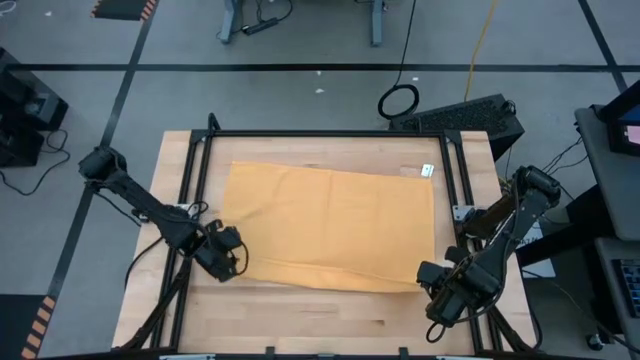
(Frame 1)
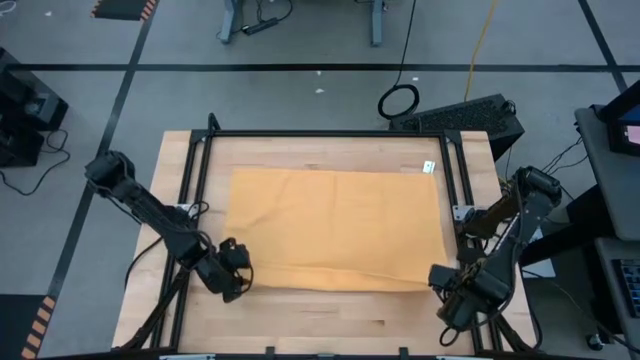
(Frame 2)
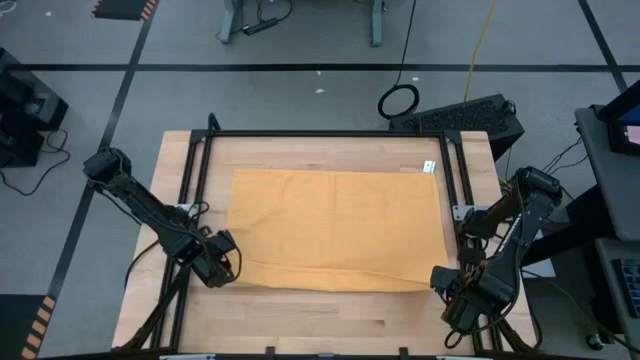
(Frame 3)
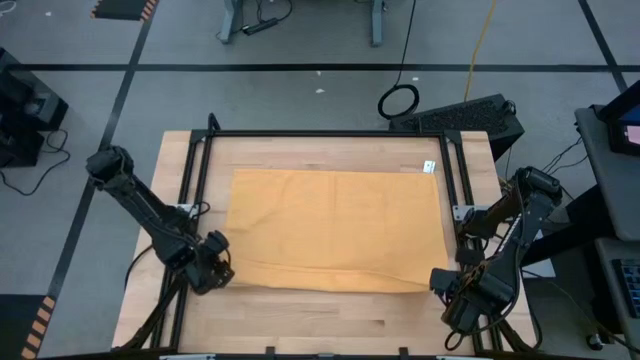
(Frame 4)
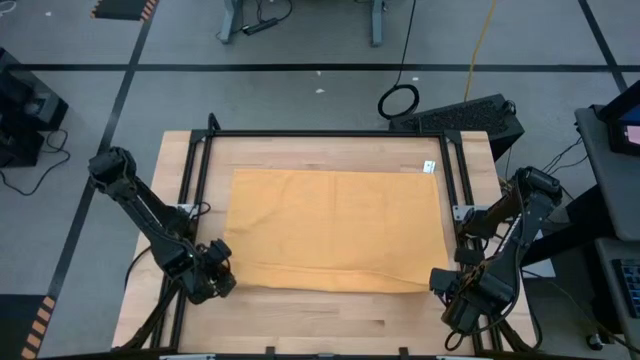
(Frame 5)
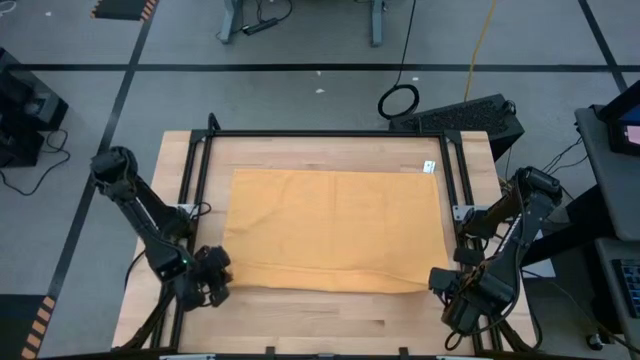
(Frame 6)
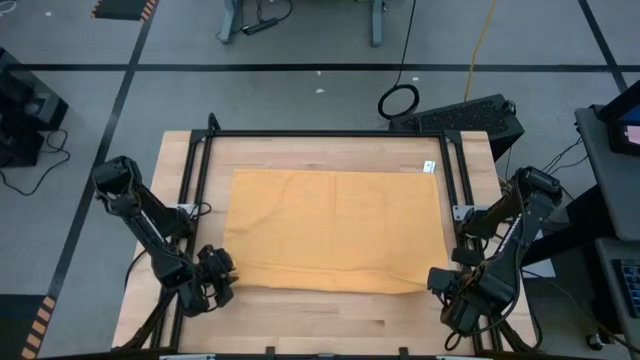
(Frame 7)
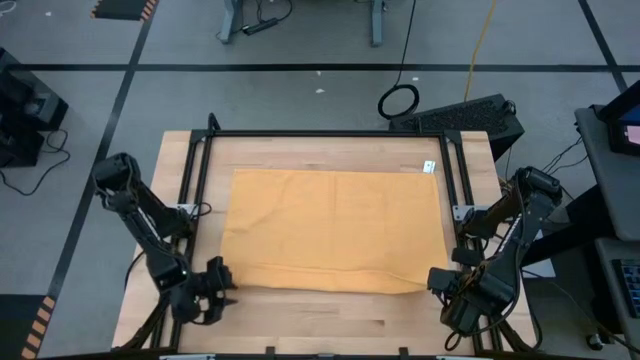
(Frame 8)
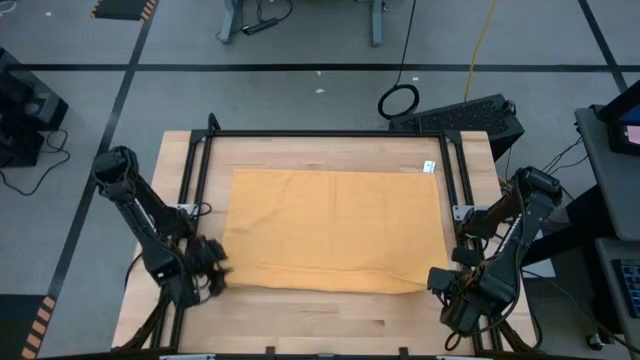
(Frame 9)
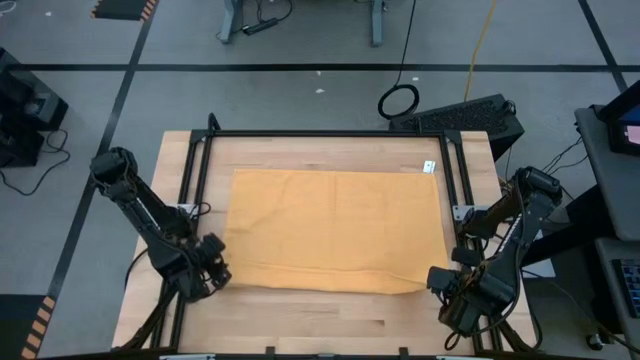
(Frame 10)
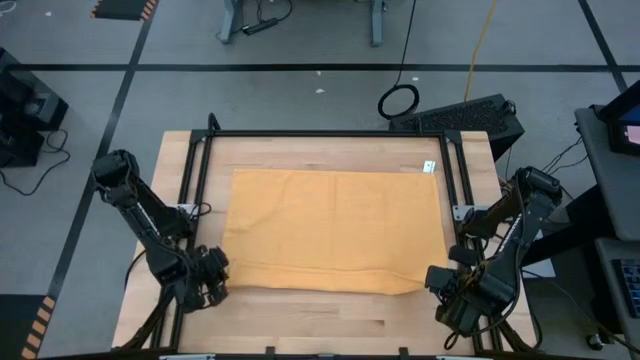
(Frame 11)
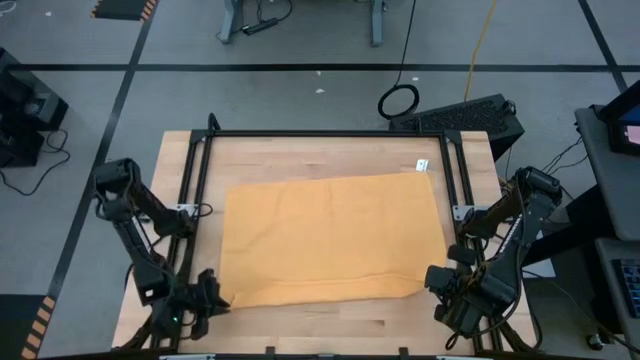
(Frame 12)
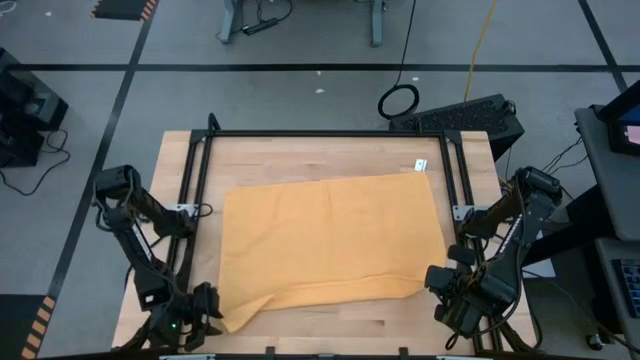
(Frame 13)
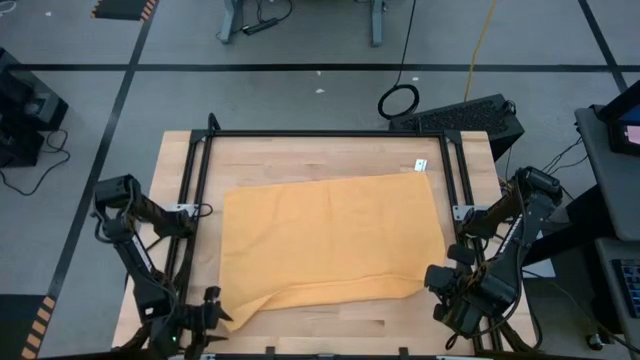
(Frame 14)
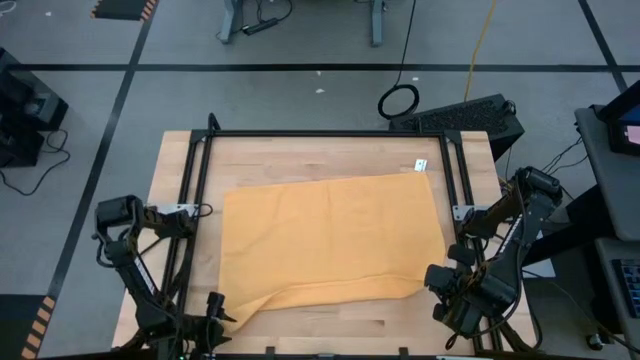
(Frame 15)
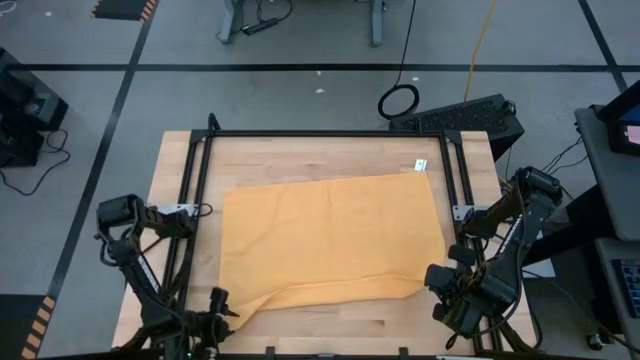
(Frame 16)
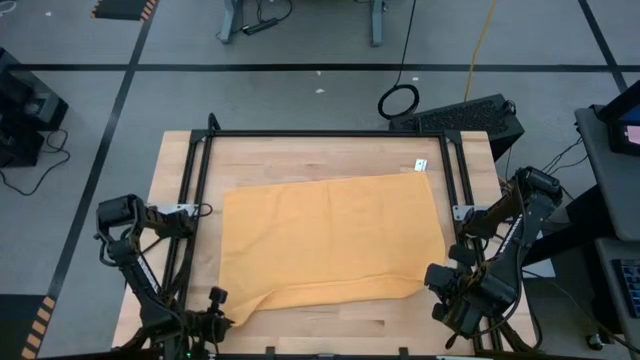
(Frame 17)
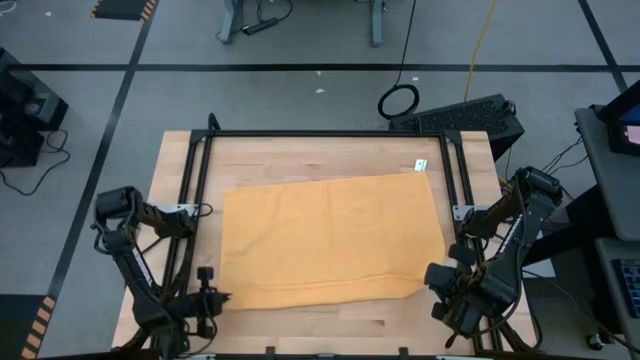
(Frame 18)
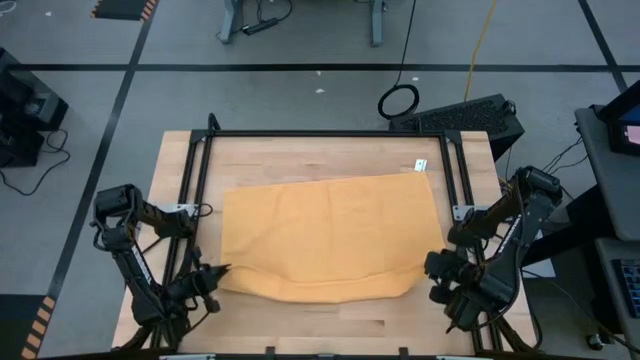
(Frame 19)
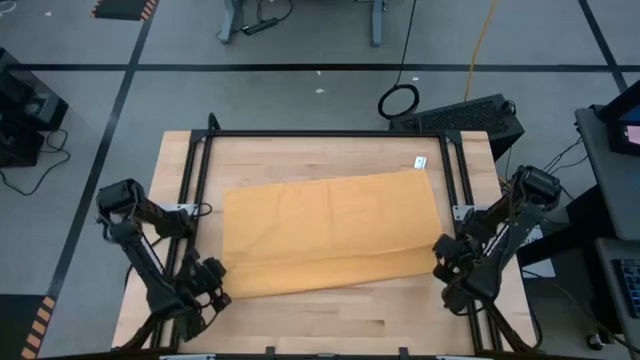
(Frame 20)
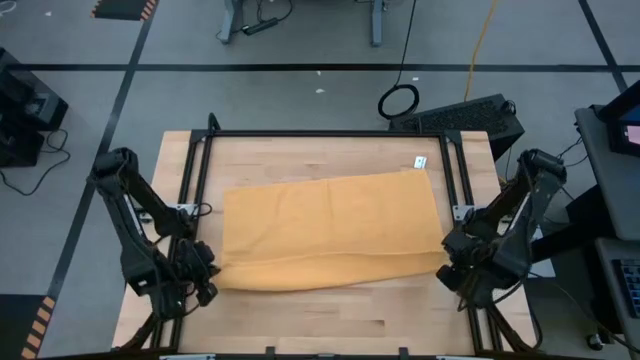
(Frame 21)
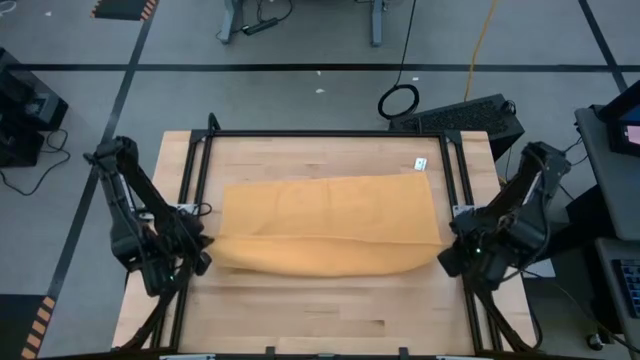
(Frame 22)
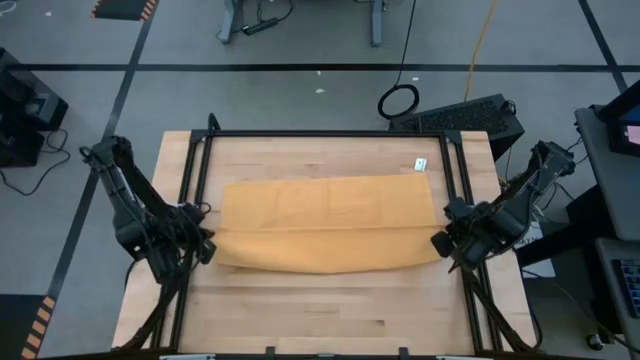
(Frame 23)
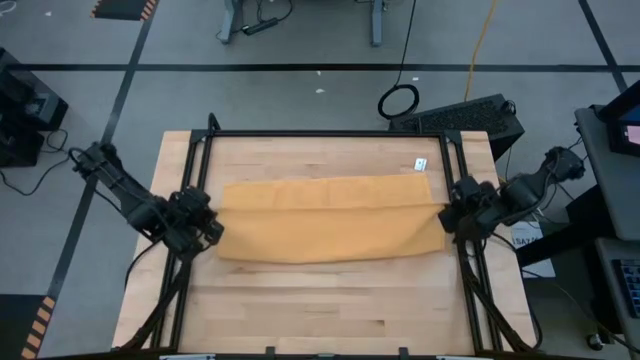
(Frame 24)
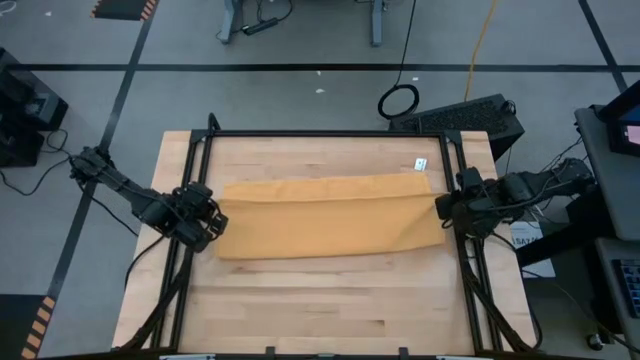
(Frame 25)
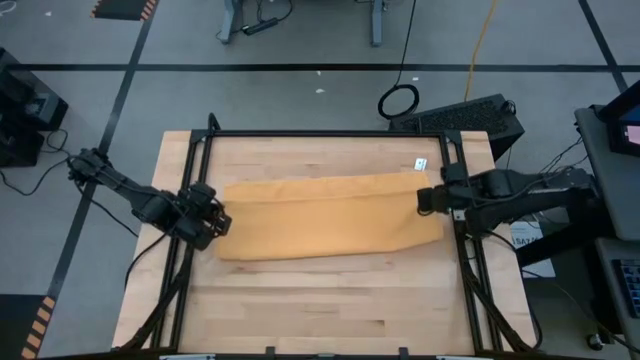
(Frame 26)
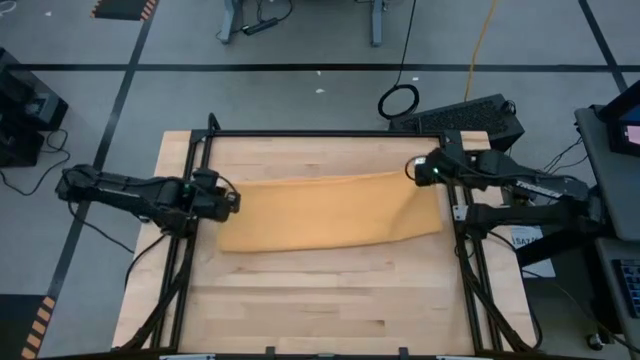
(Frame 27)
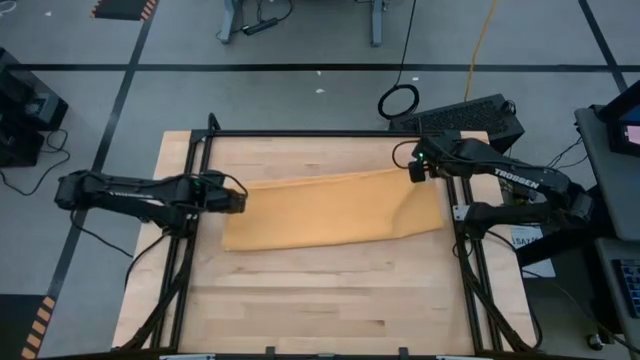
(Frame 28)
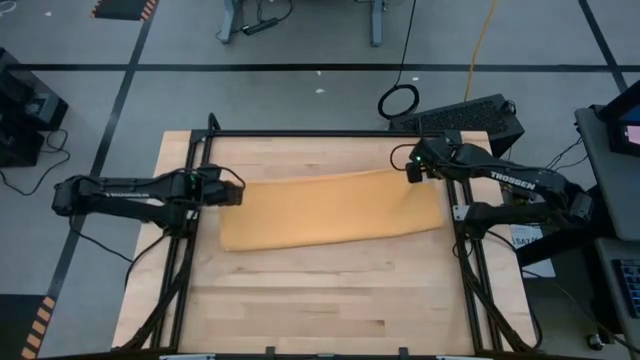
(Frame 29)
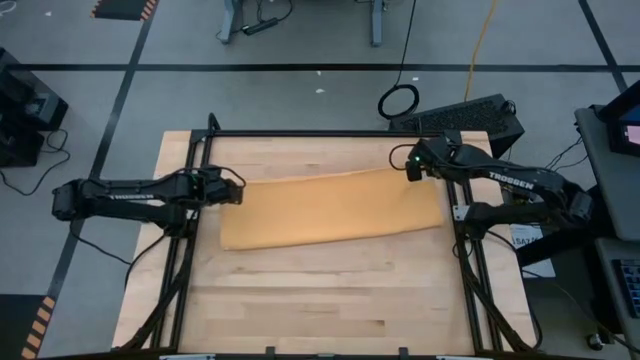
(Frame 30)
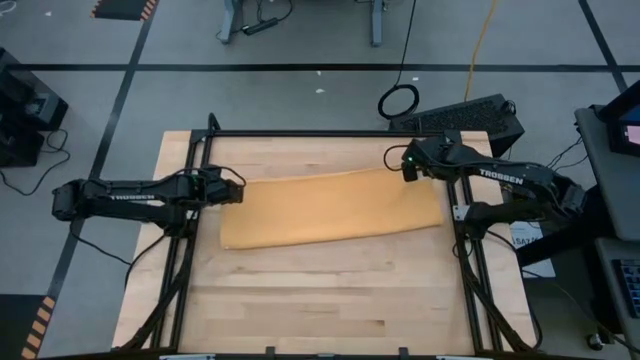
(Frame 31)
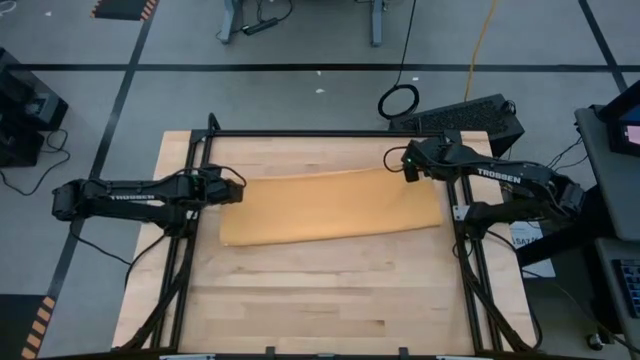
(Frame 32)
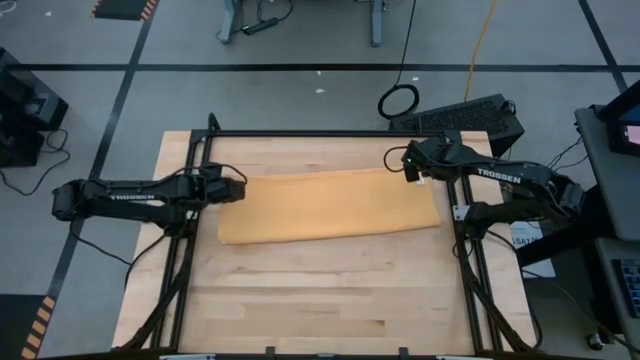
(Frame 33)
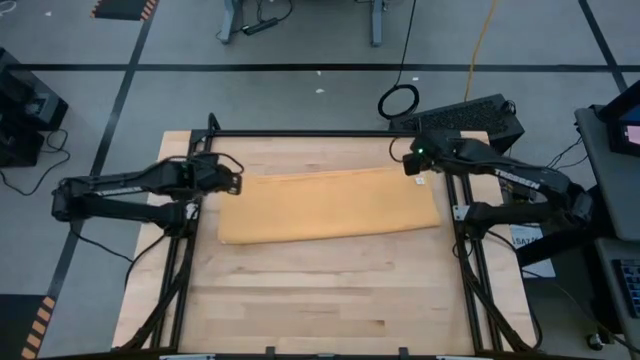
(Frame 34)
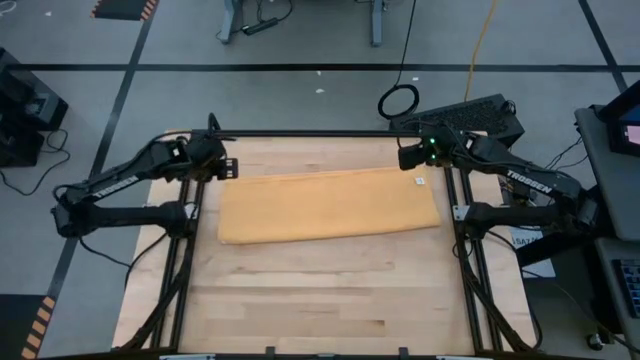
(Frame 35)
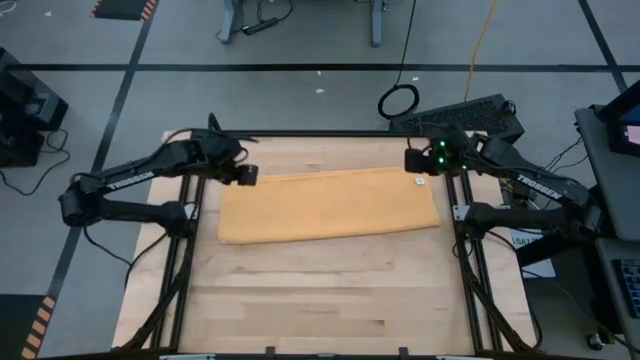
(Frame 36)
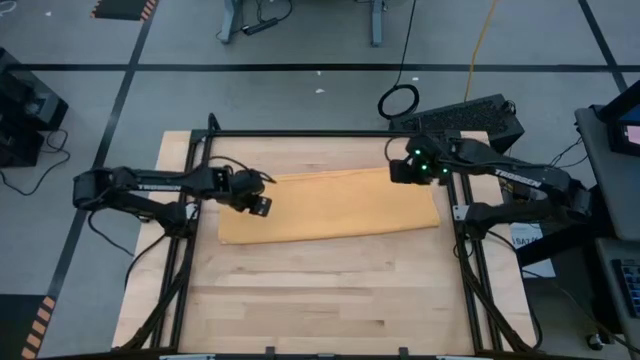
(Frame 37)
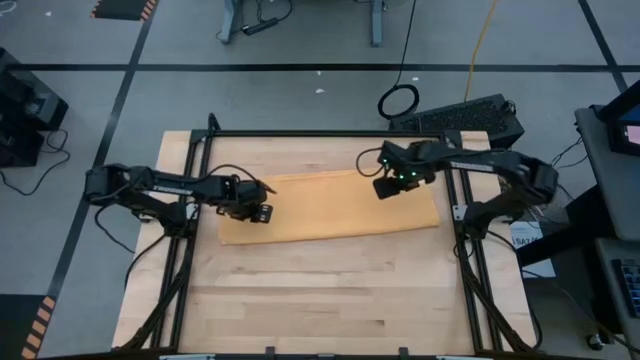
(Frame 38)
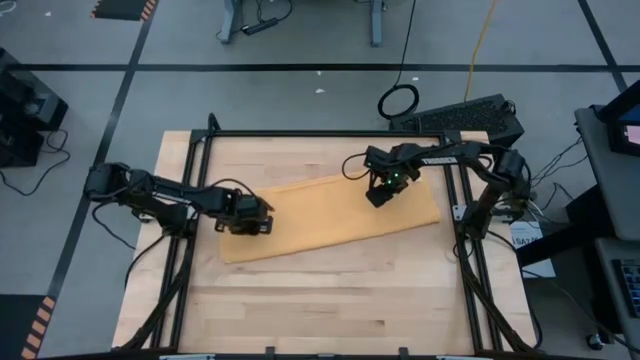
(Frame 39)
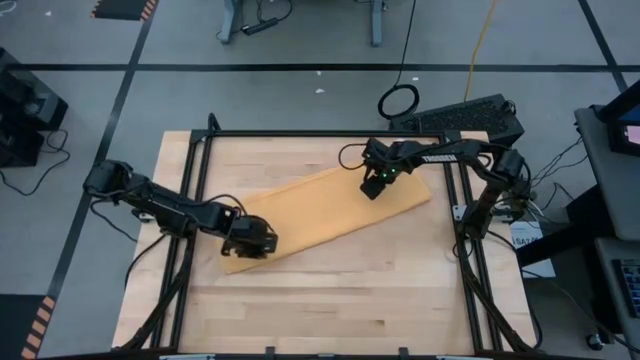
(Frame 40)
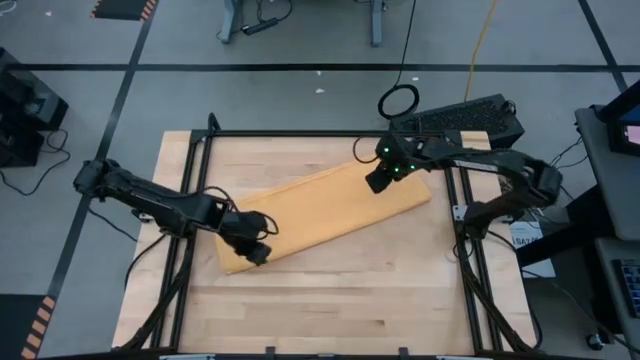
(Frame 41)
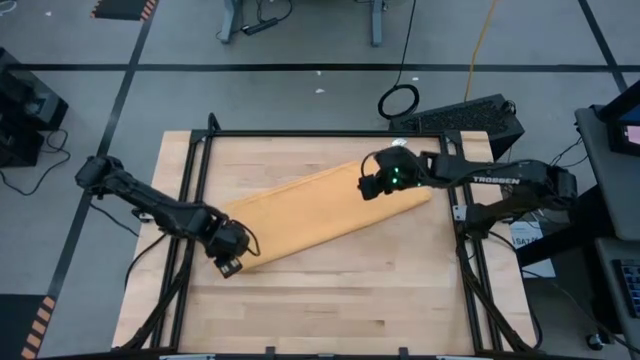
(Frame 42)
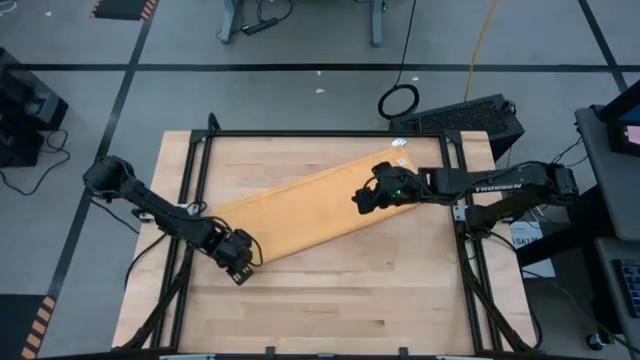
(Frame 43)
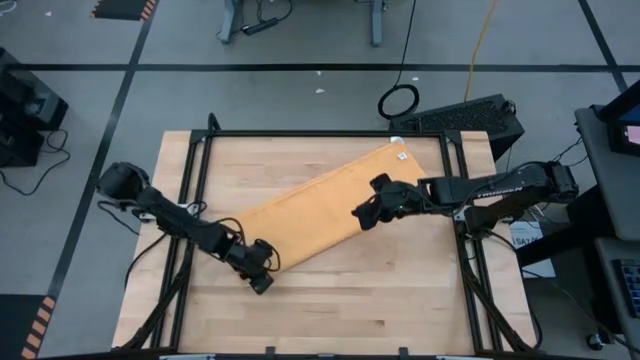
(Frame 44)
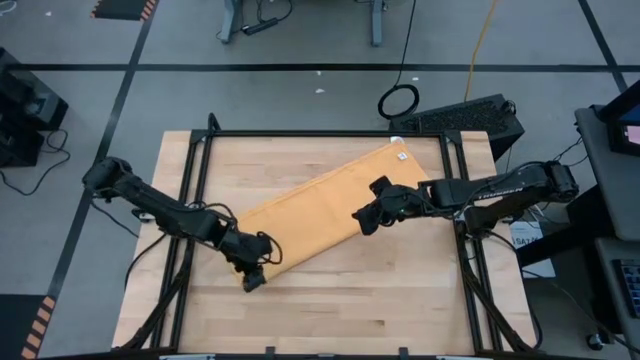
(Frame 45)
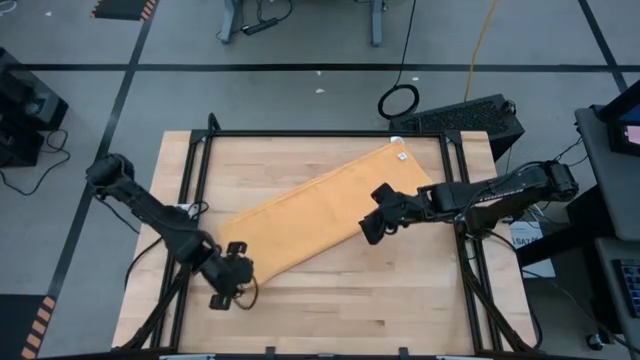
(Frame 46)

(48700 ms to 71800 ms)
Task: Roll towel into tight, uniform cylinder
Roll the orange towel
